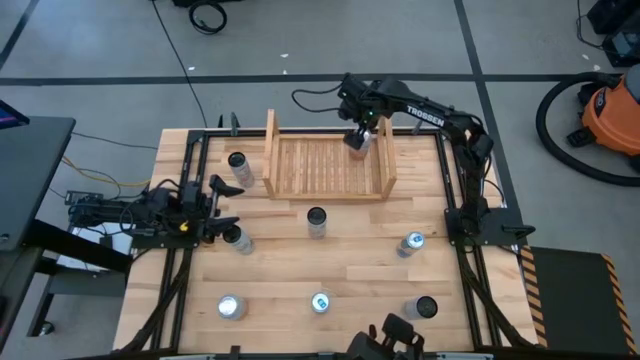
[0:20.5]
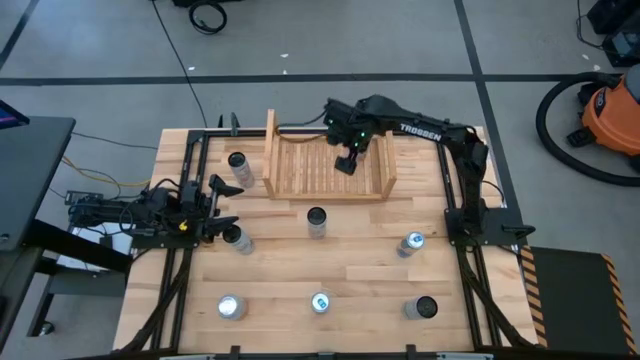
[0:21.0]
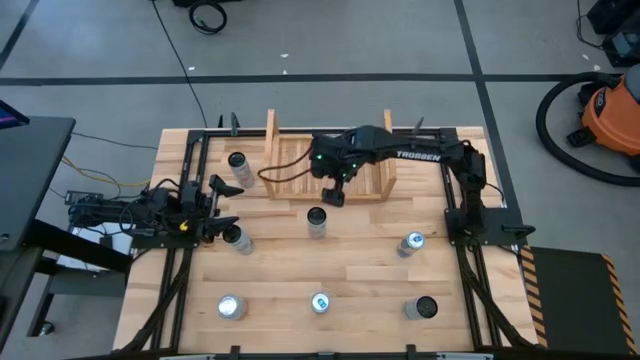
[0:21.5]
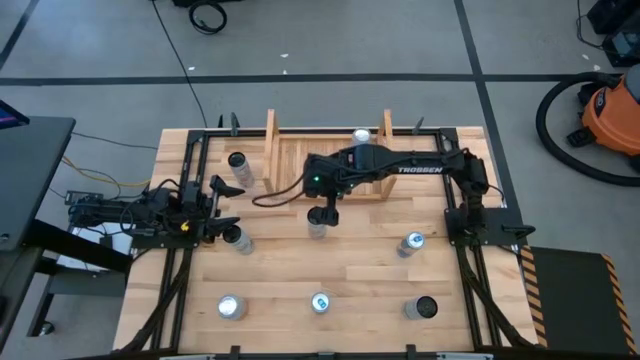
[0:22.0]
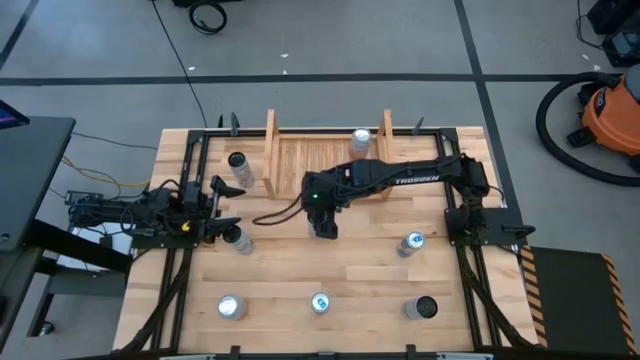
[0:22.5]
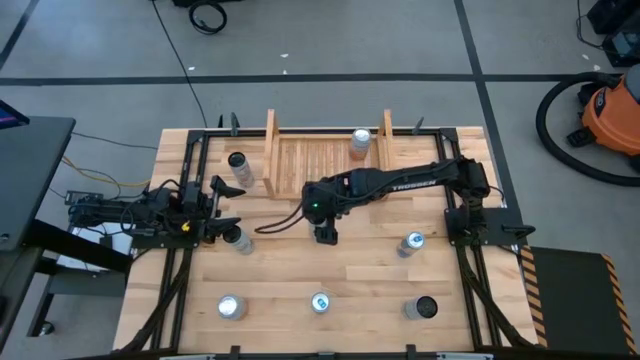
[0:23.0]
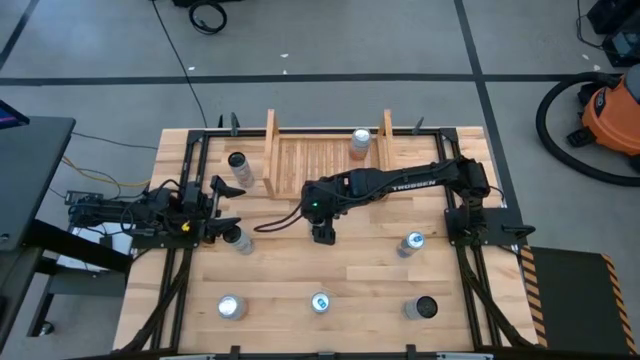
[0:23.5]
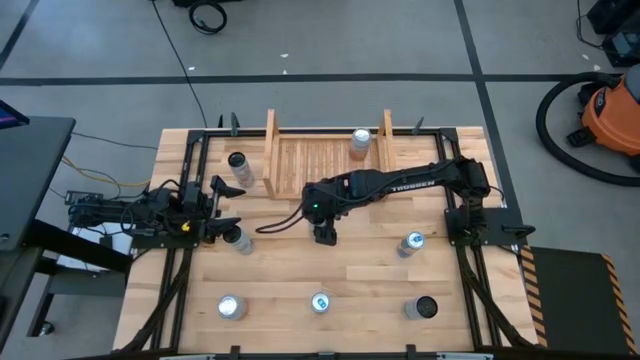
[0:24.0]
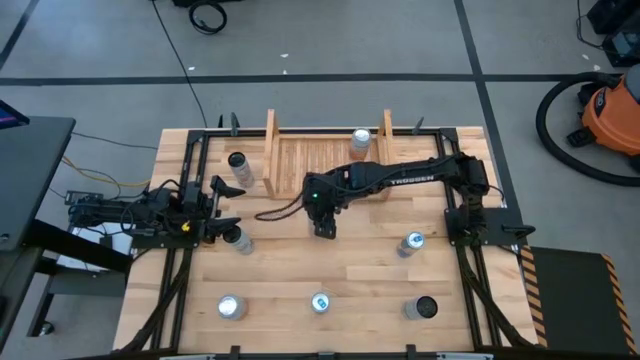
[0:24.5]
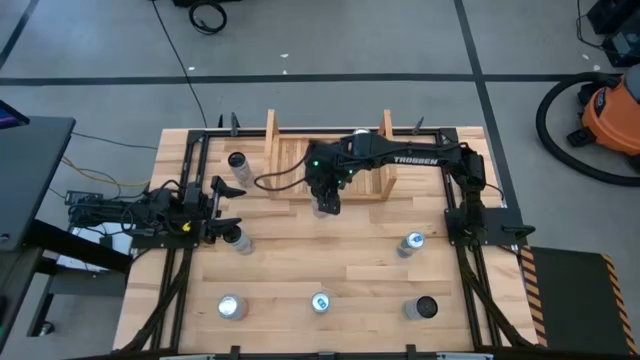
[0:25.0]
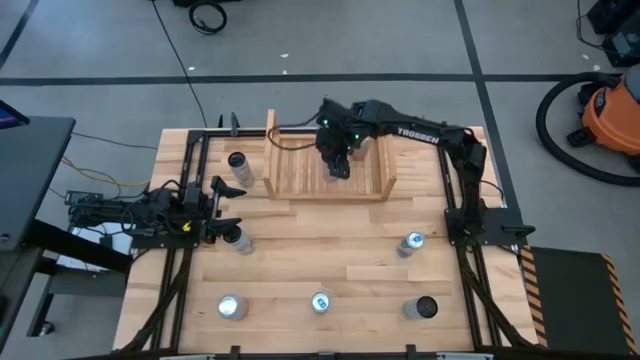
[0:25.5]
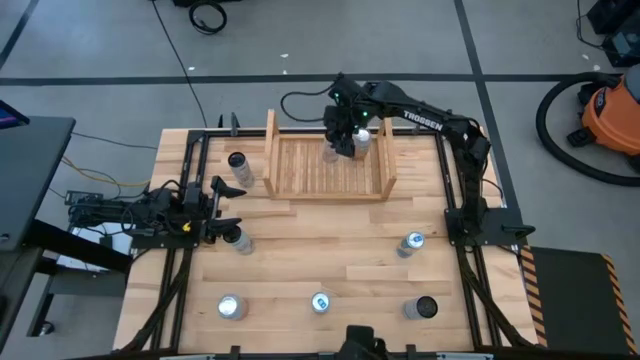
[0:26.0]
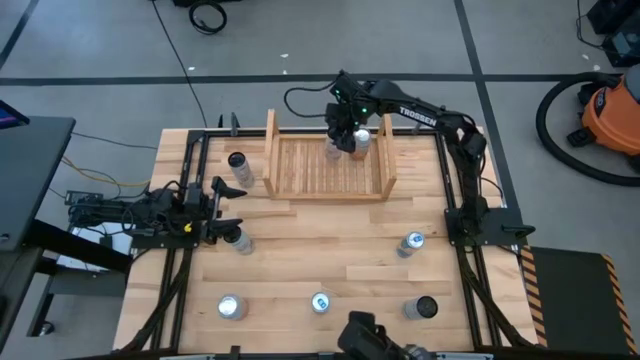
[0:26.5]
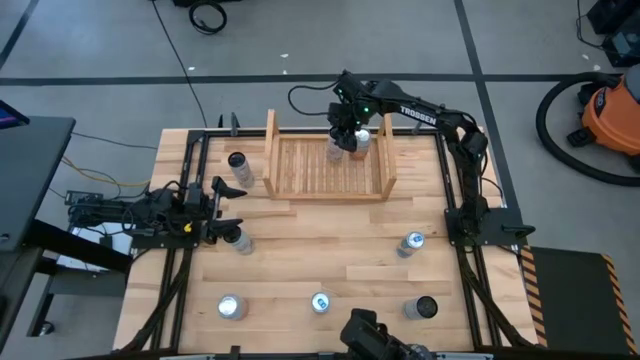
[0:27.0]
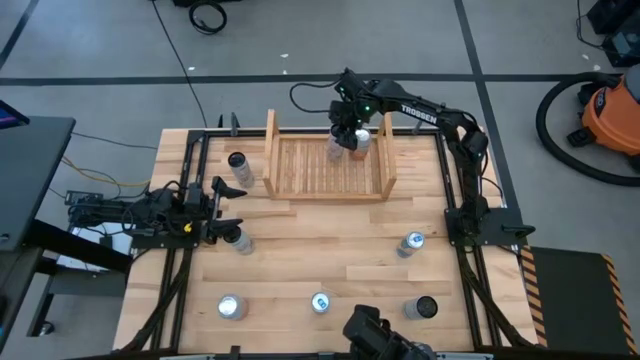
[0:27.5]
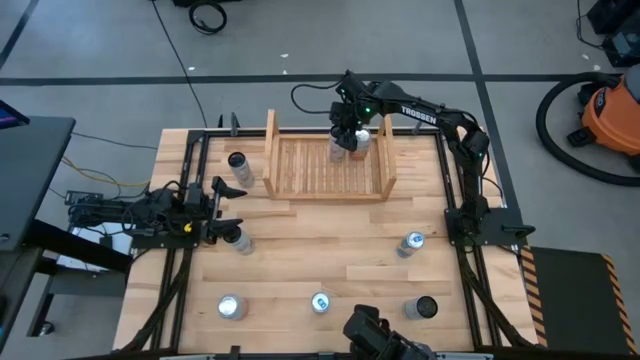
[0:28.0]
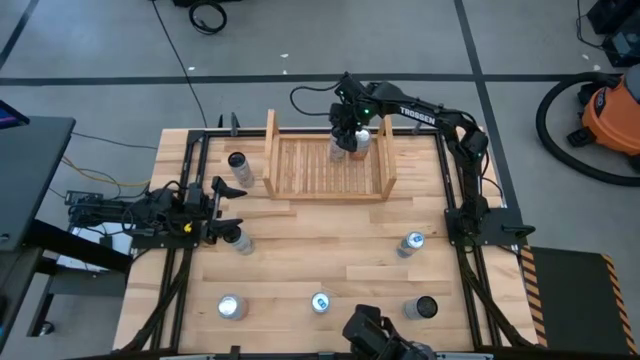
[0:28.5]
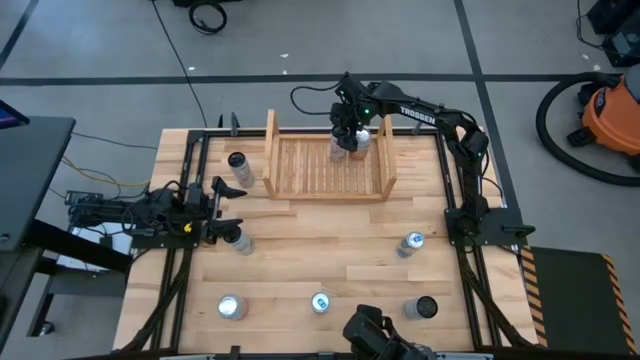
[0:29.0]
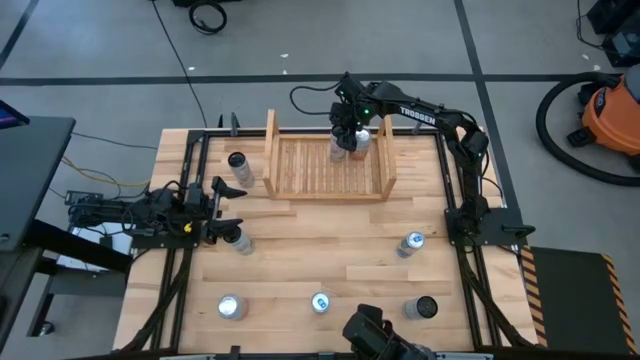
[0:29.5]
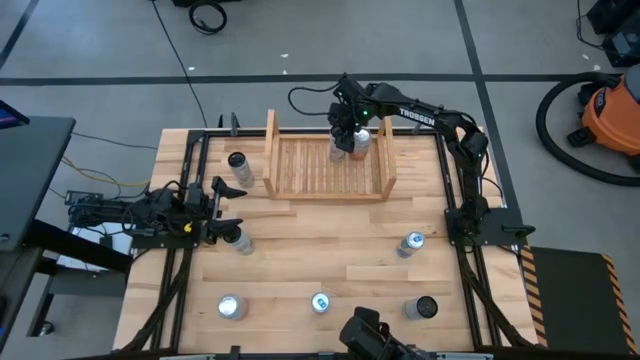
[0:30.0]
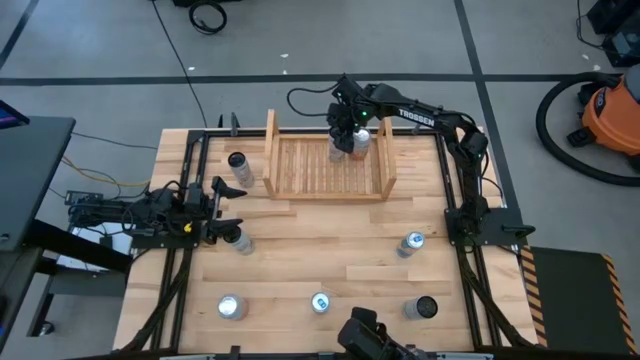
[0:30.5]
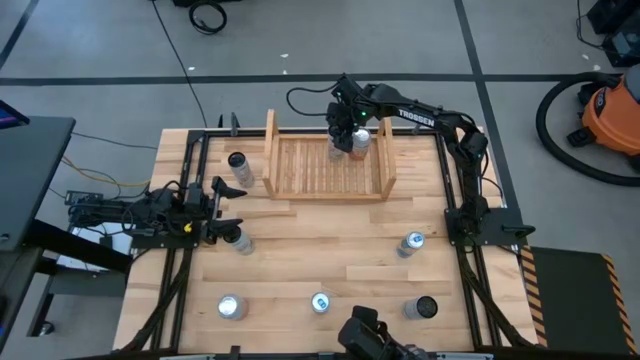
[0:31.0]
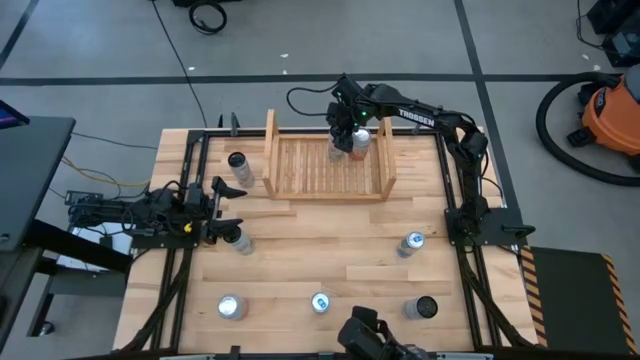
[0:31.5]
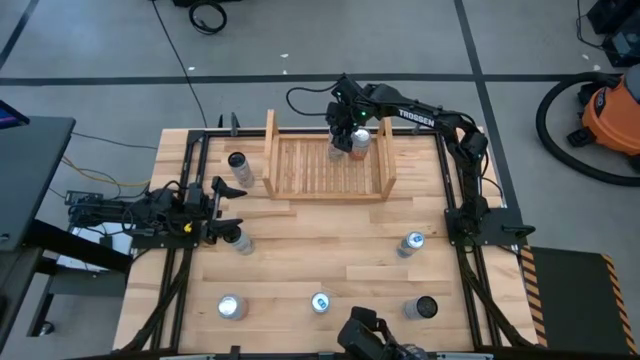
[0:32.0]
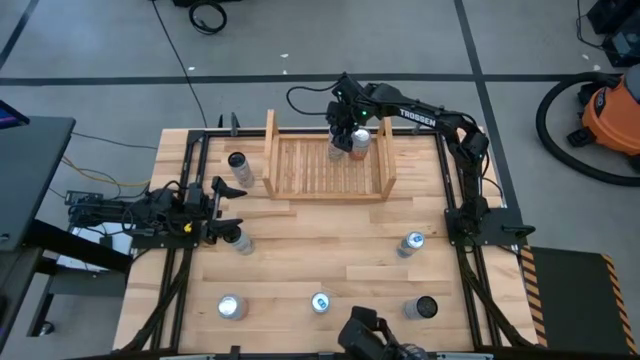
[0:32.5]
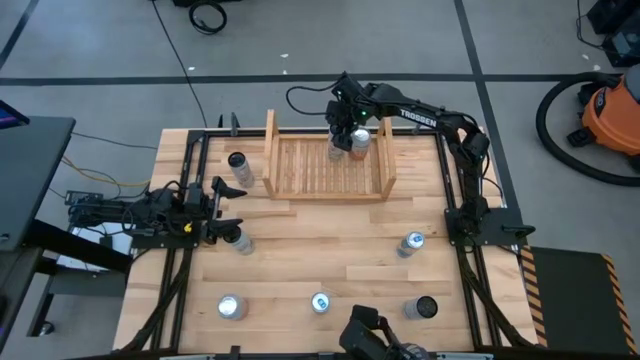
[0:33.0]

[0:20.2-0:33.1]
Task: Place canned beverage on shelf
Put the bottom white-pink soda can on the shelf

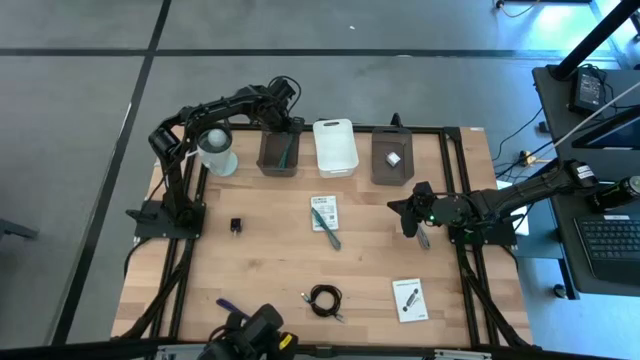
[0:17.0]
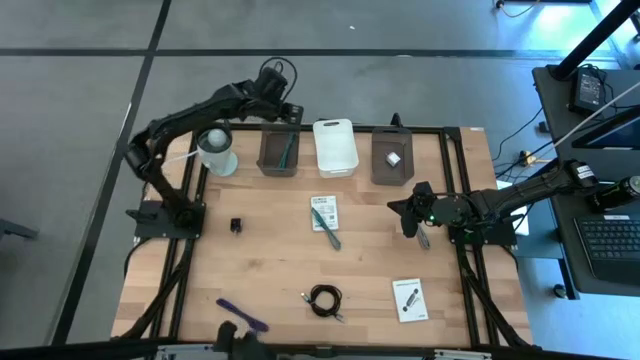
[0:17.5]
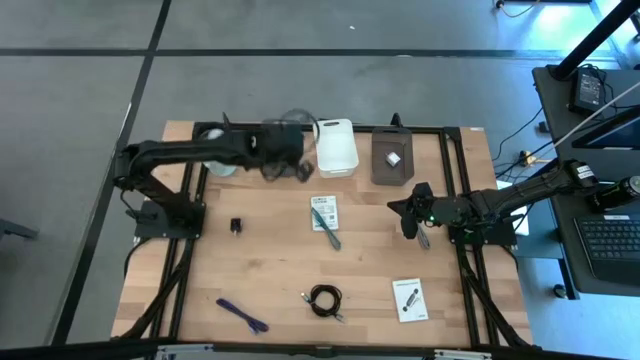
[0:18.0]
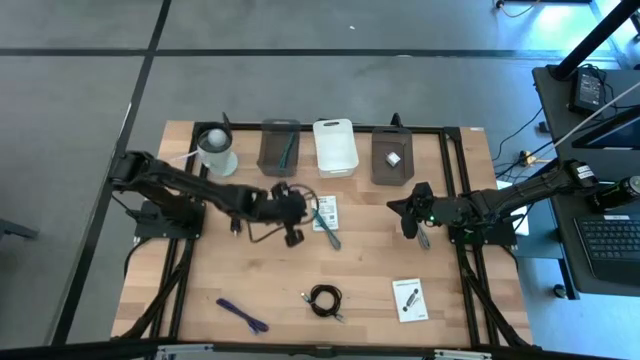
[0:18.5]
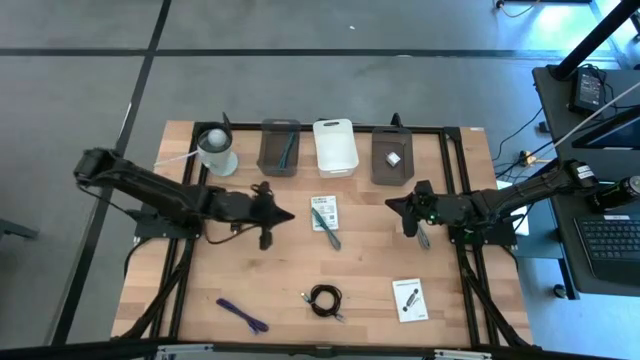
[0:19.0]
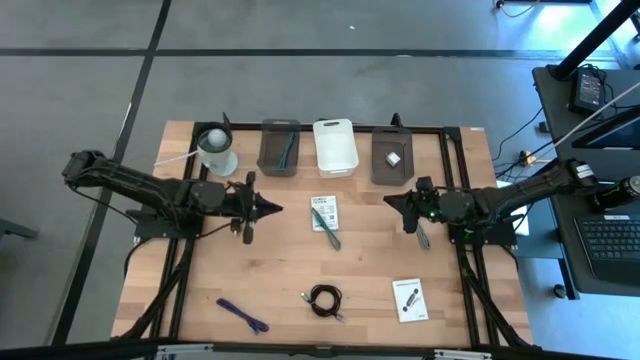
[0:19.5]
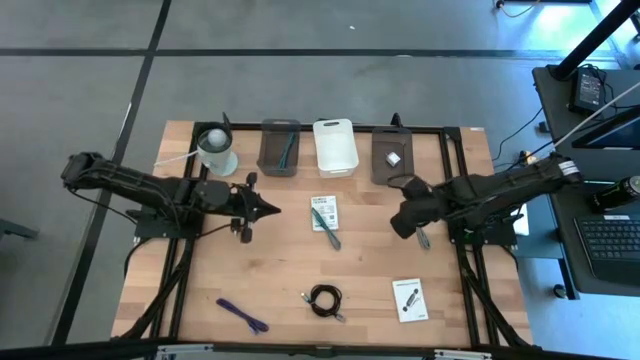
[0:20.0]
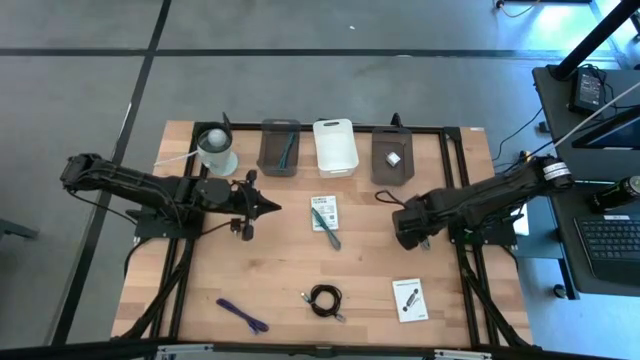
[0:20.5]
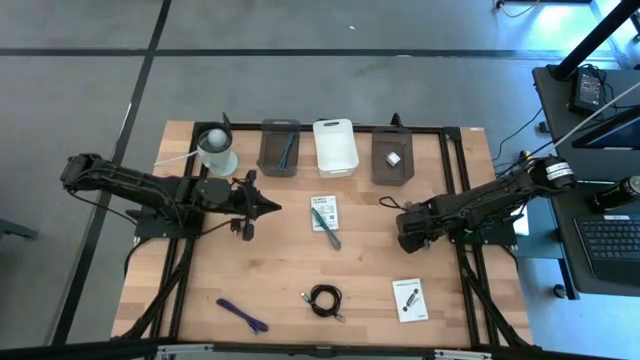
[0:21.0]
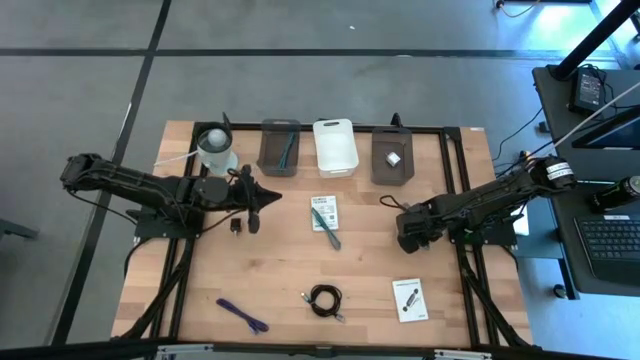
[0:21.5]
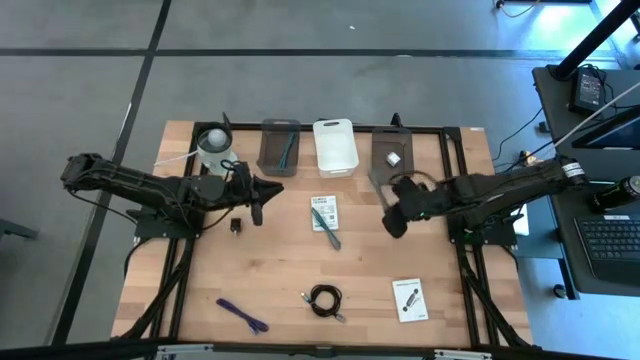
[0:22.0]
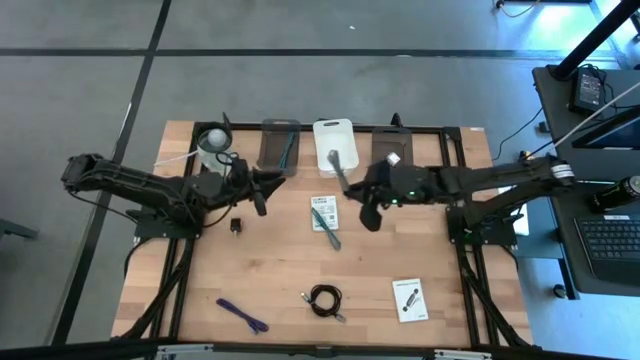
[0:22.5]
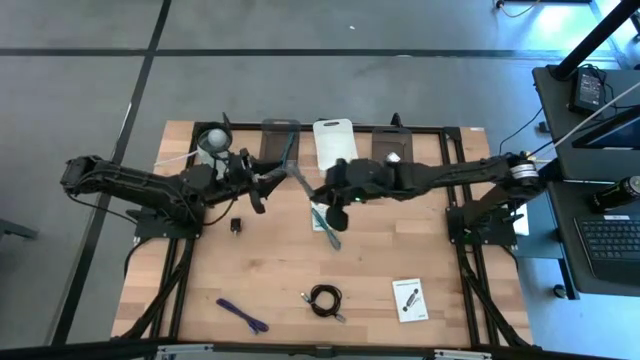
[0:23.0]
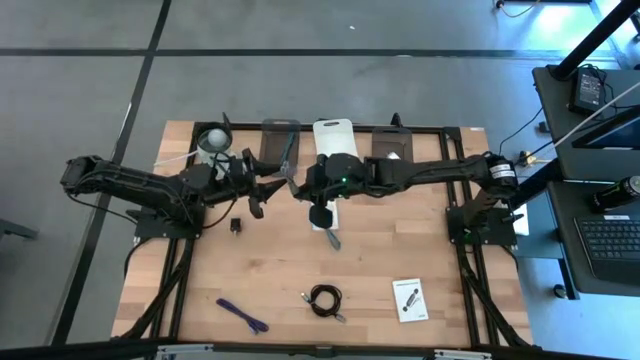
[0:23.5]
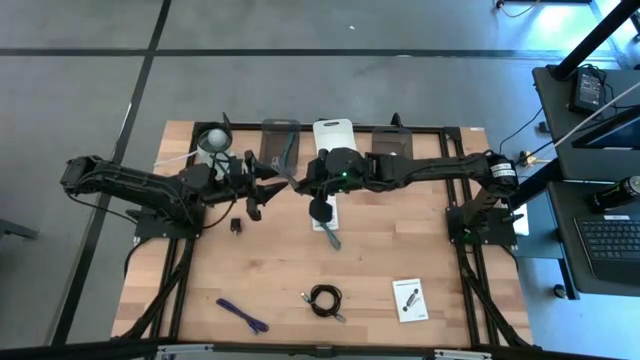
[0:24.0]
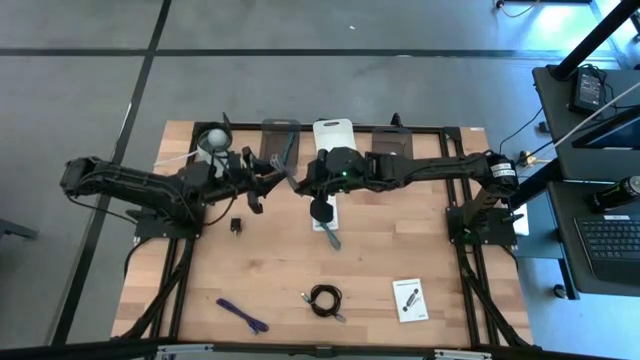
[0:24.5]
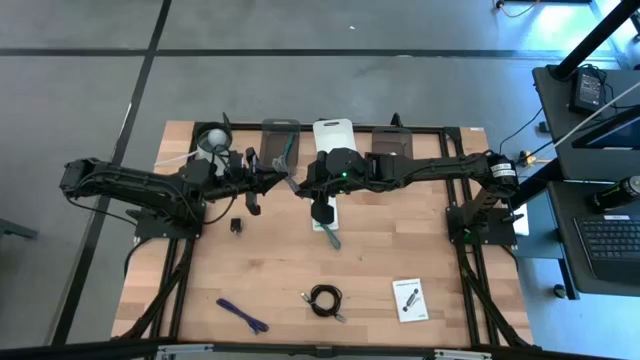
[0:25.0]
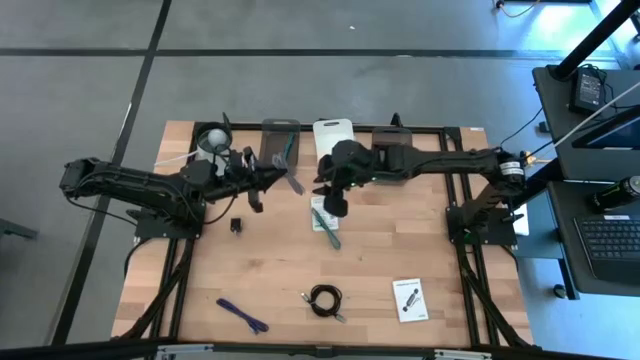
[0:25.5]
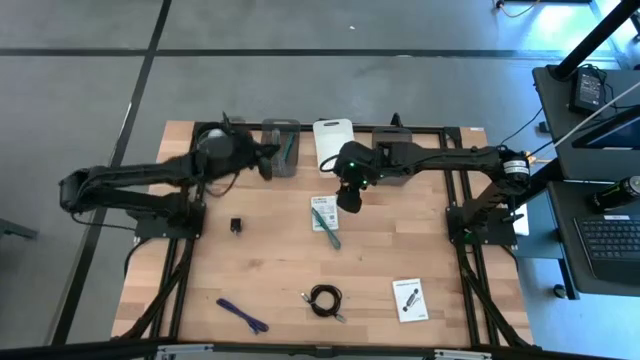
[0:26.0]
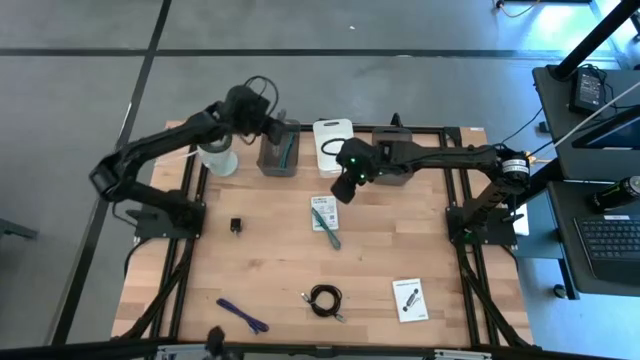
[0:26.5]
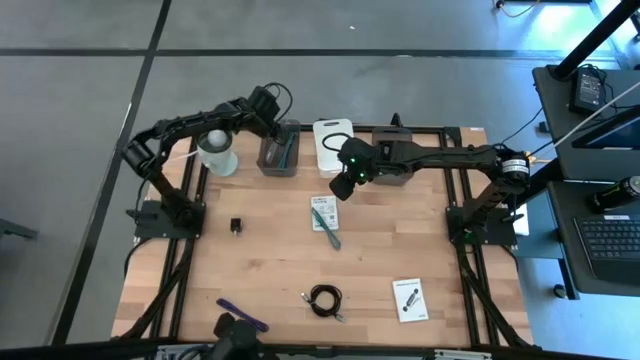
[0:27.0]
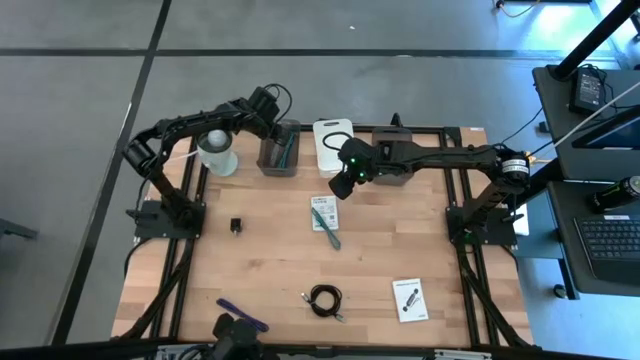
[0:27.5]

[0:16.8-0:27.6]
Task: Pick and place items into bin
Put the gray charger cable into the left black bin
